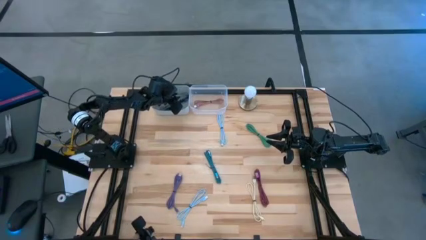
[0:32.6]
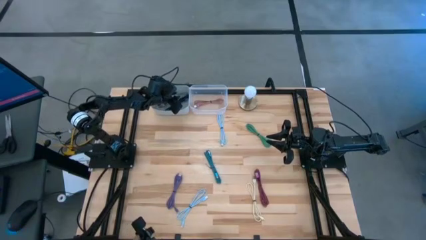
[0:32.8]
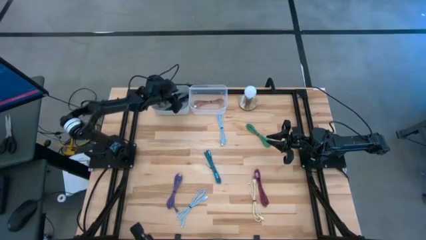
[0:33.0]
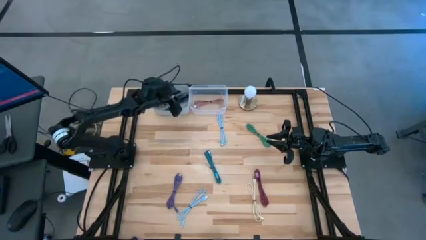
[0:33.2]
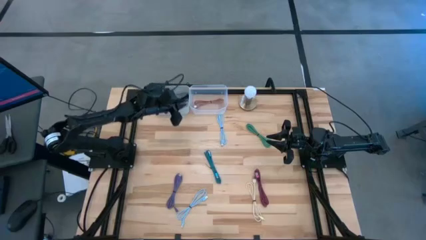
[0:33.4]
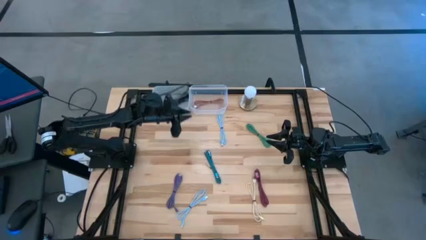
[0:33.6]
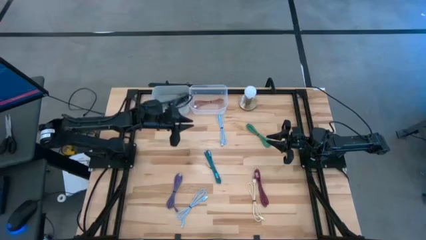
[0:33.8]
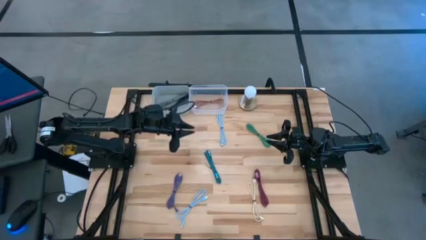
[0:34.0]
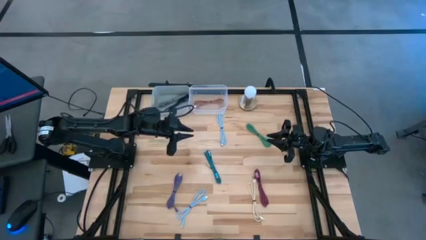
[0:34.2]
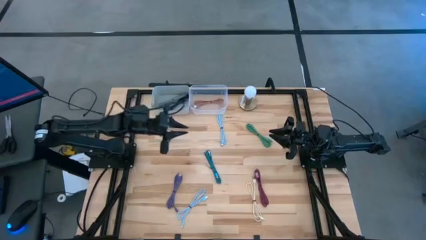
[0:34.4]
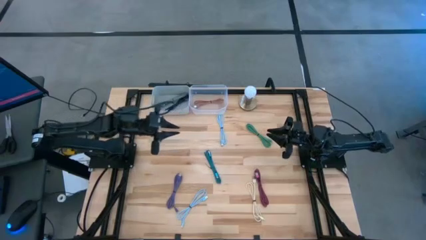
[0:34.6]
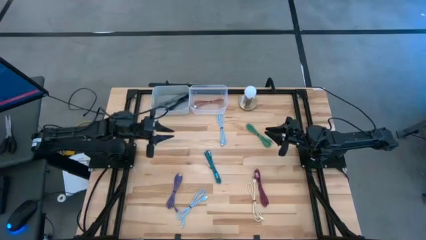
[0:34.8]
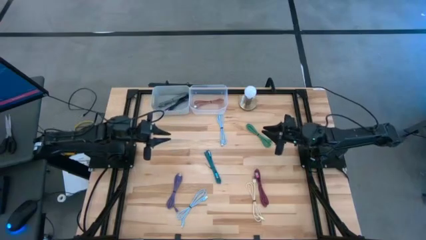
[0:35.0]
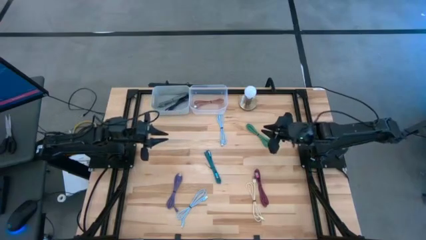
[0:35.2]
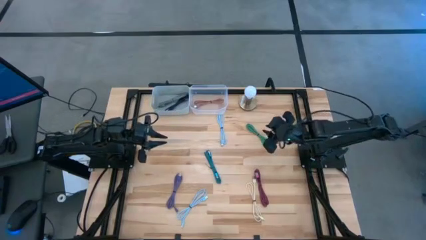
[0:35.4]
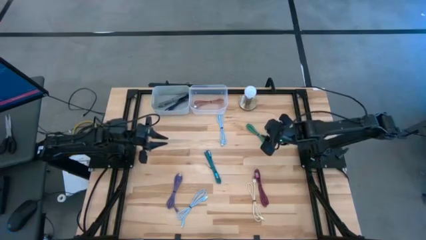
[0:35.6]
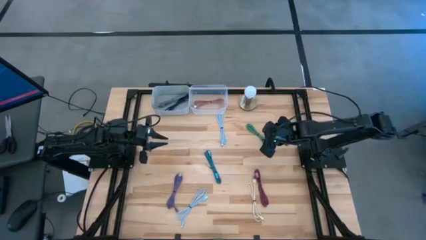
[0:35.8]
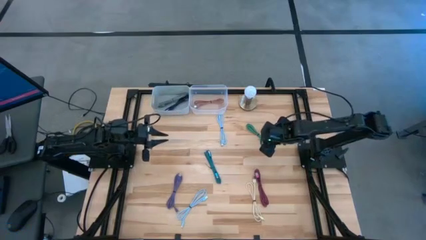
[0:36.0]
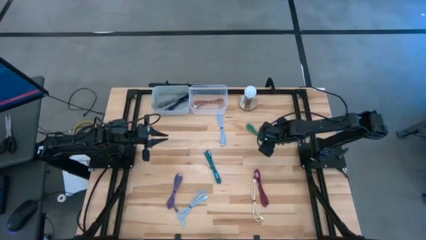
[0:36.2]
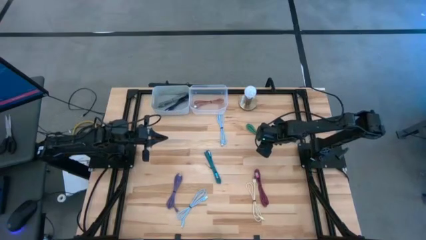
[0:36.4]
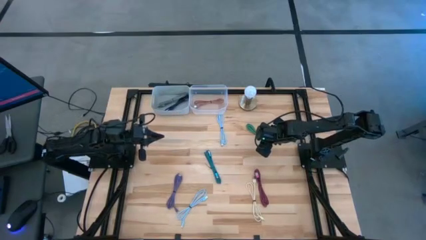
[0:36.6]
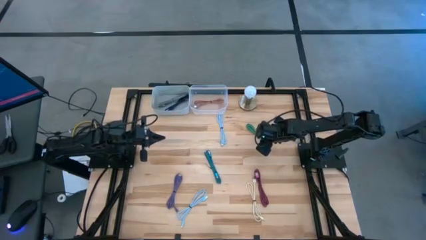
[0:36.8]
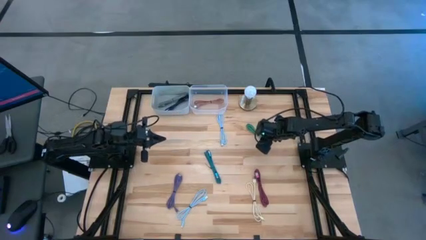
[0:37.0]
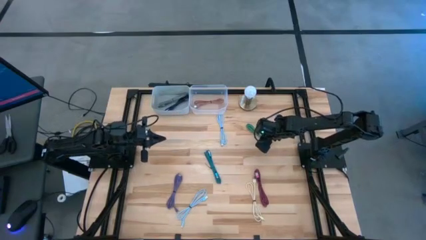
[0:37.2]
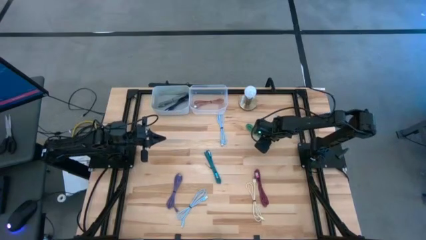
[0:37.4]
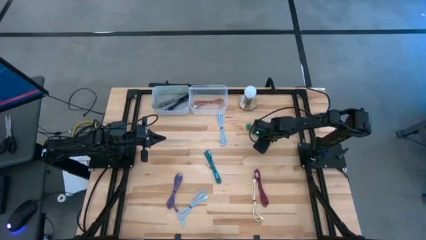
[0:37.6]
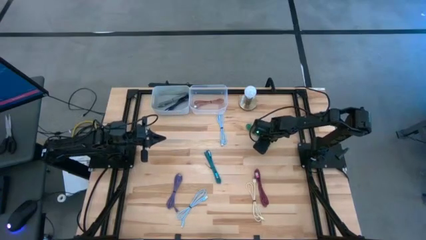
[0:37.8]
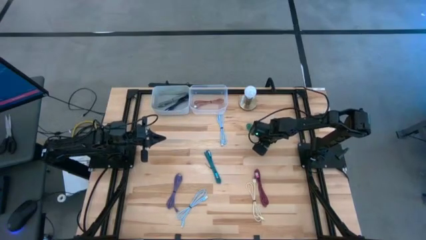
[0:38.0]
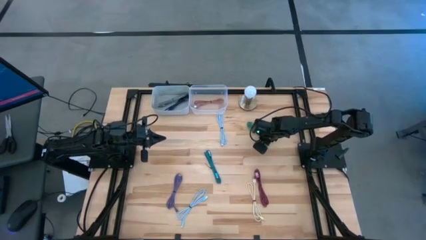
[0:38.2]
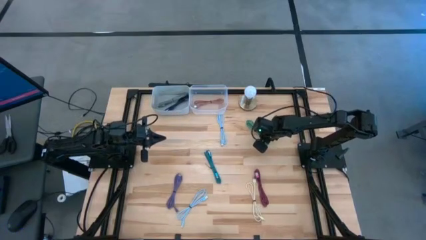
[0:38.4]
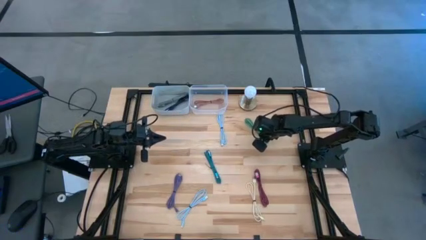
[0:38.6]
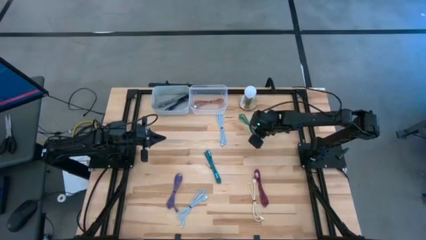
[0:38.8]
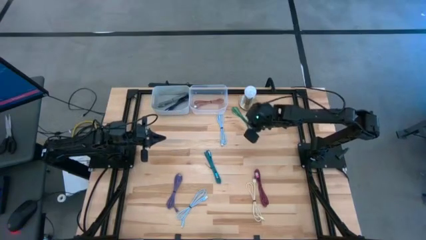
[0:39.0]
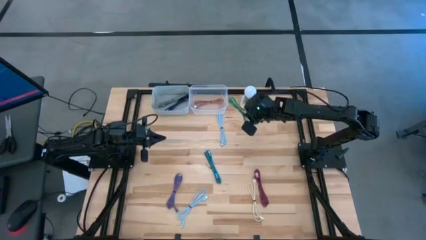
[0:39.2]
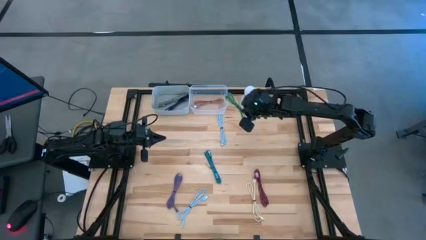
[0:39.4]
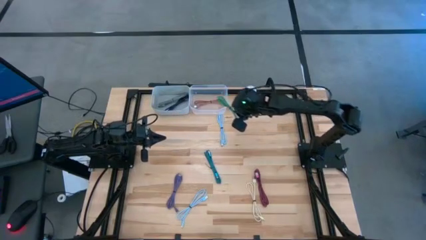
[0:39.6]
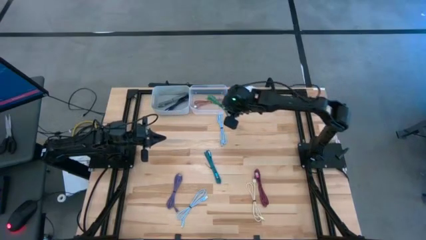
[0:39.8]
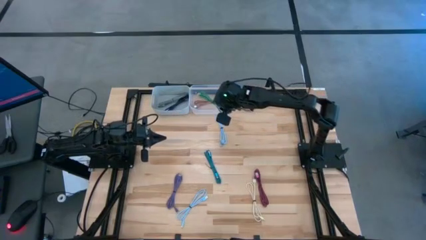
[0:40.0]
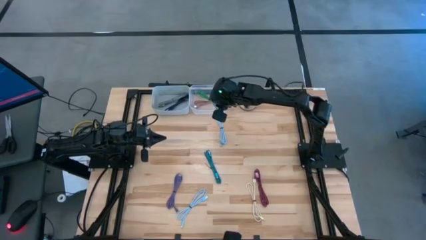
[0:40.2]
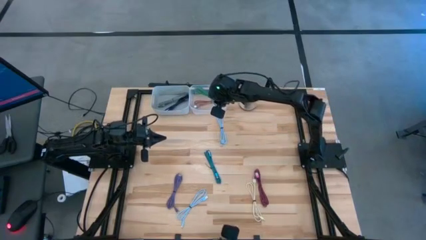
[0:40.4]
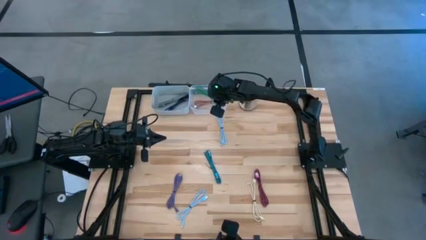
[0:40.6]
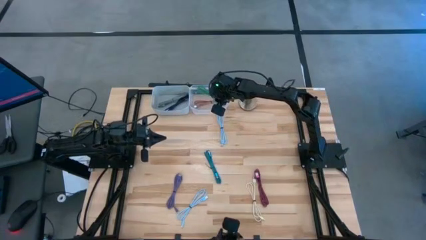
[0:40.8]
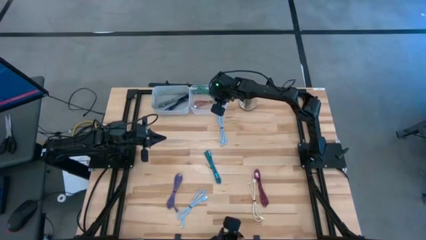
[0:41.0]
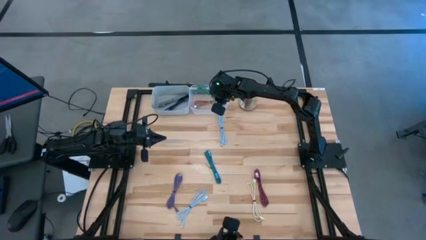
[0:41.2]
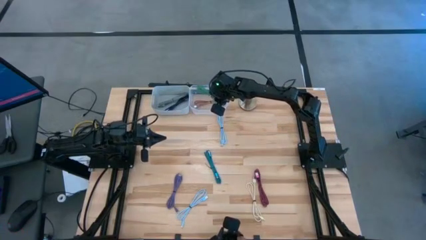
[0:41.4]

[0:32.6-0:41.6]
Task: Pick & Place USB Port
Put the green USB cable into the transparent bin

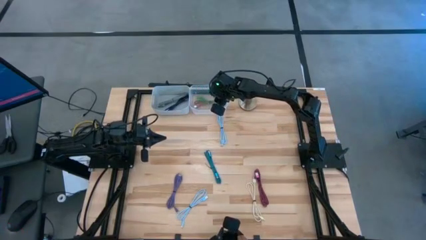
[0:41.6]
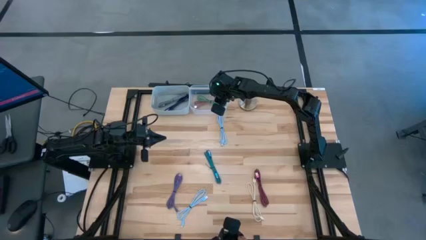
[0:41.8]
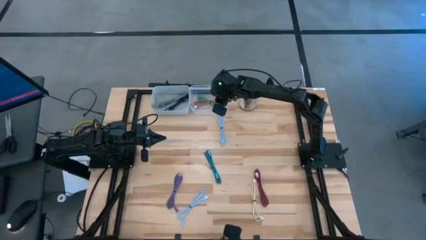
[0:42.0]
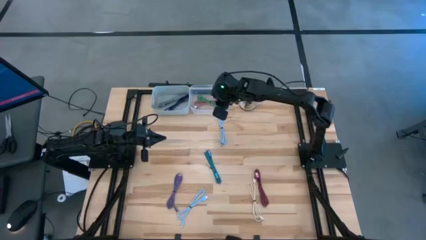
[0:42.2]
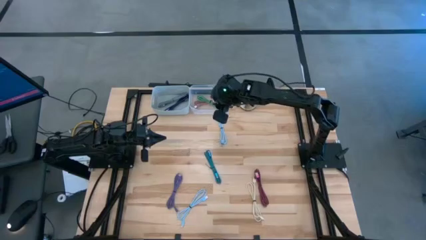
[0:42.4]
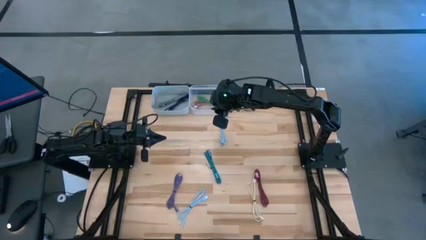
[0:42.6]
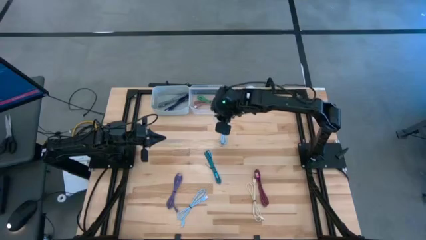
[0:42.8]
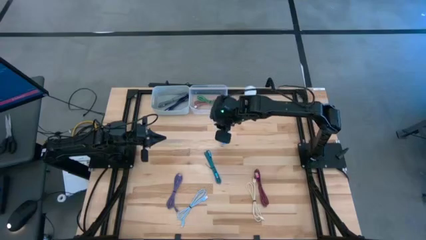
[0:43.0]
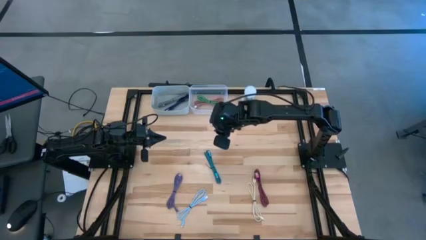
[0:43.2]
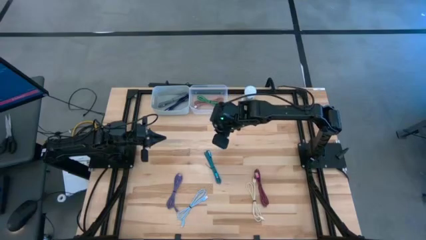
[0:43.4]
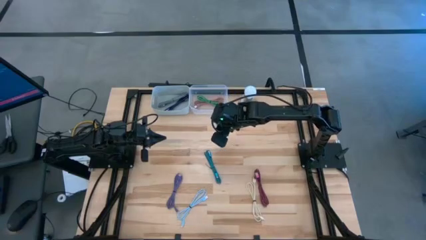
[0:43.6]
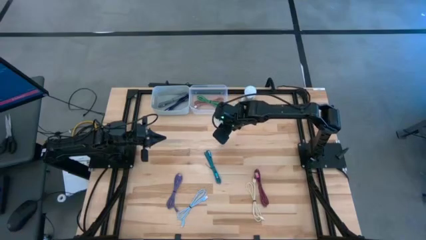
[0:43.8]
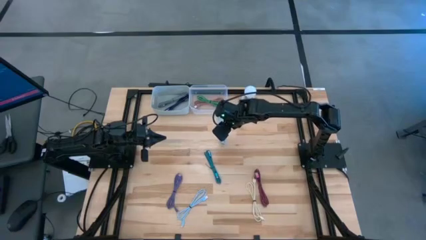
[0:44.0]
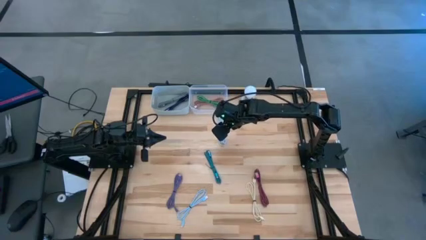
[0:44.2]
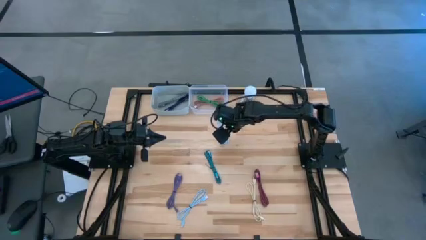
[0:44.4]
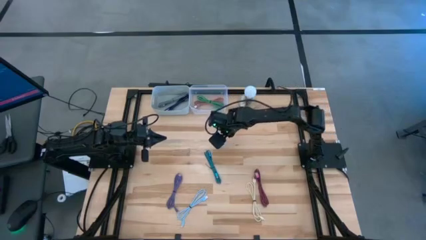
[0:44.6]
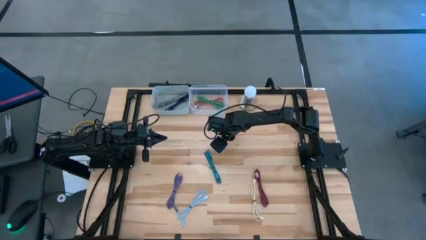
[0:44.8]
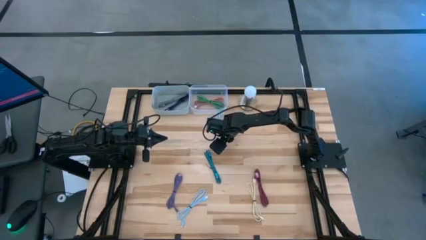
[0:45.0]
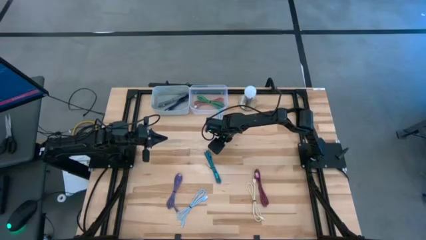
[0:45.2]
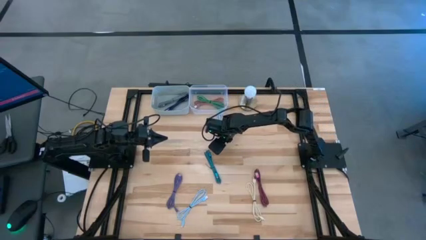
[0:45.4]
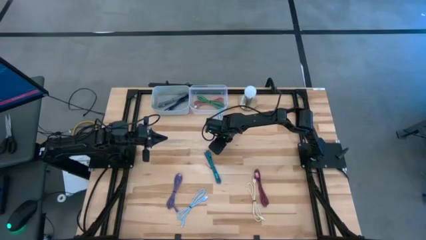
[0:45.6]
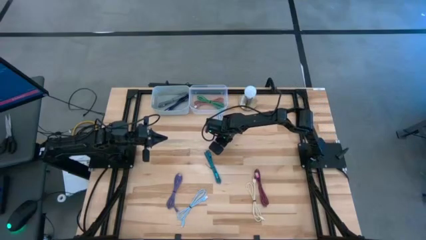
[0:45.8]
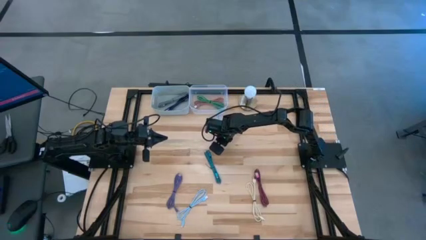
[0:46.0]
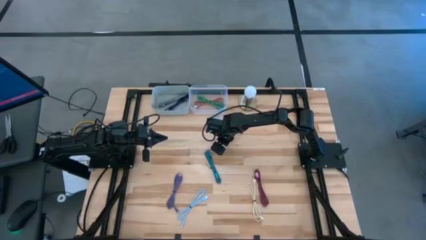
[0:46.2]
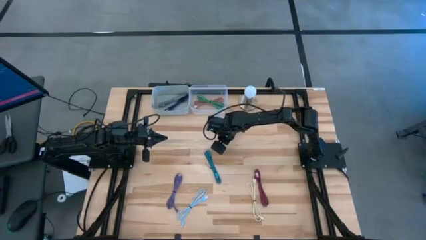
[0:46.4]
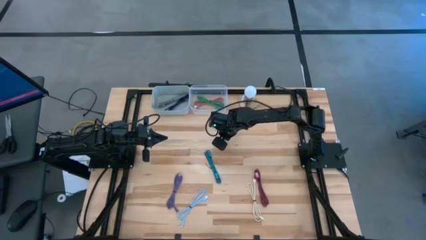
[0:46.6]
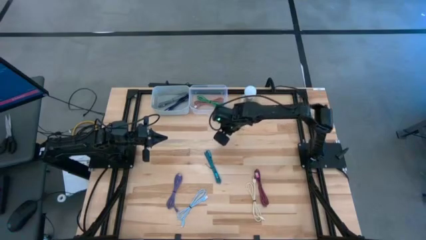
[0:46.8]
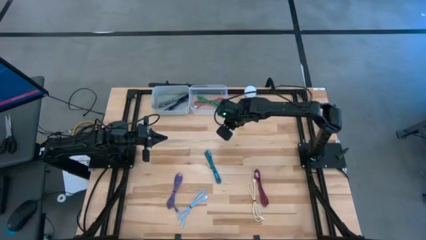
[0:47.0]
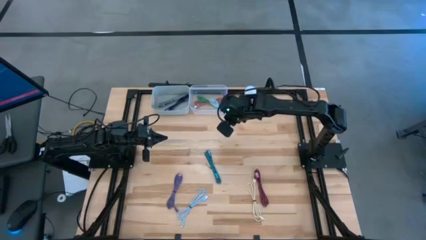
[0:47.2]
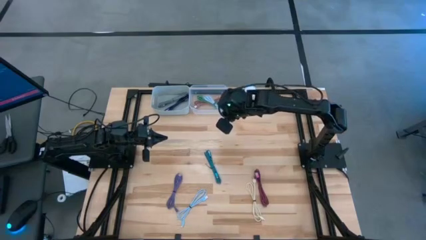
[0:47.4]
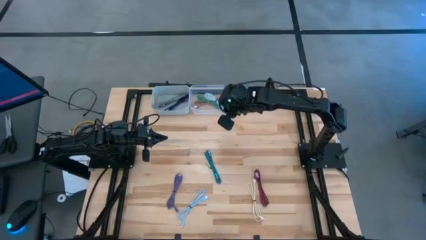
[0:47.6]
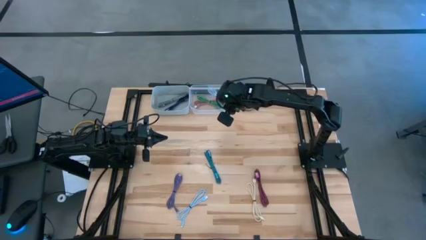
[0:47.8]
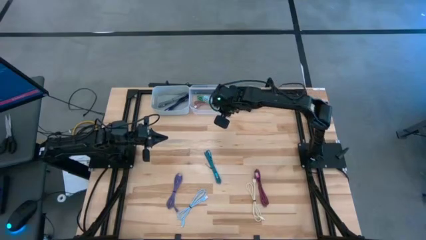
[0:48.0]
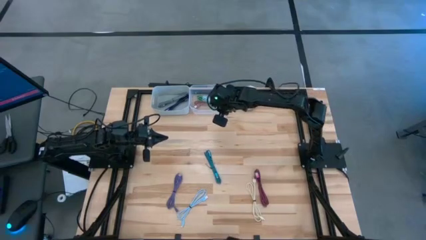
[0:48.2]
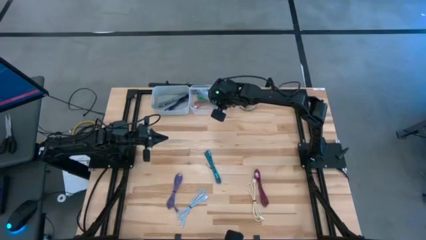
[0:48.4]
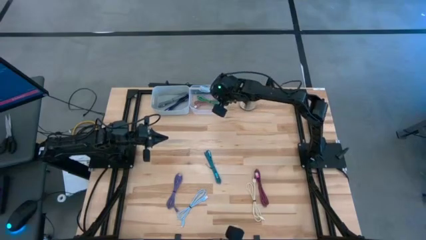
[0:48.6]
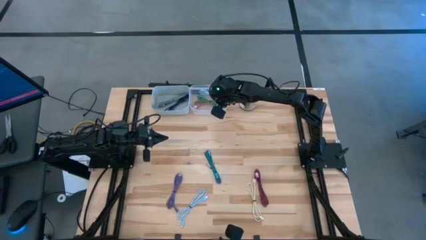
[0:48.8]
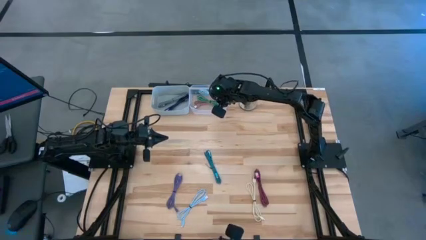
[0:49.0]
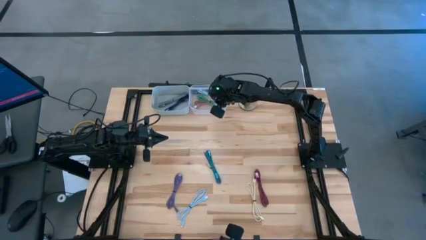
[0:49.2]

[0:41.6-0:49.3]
Put the top light blue USB cable into the transparent bin
